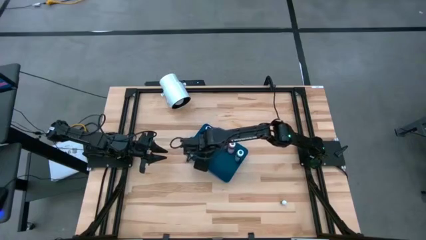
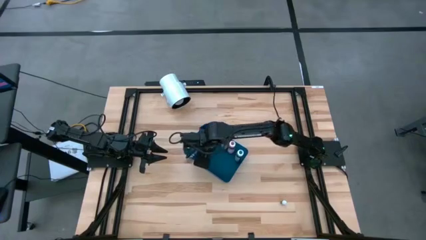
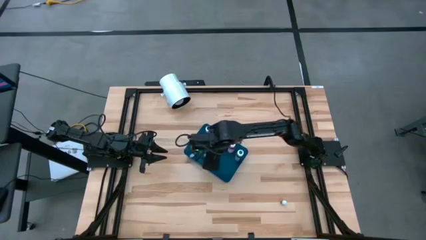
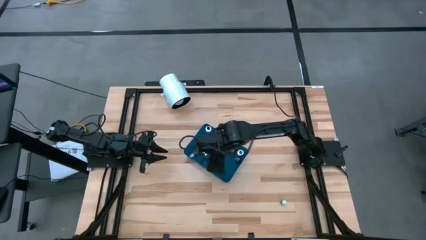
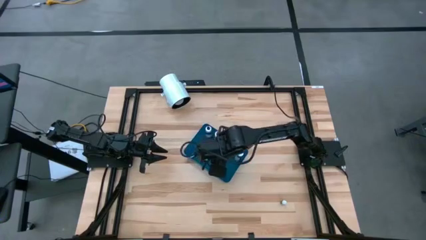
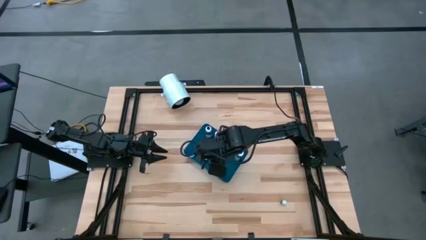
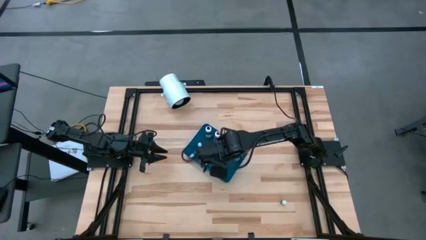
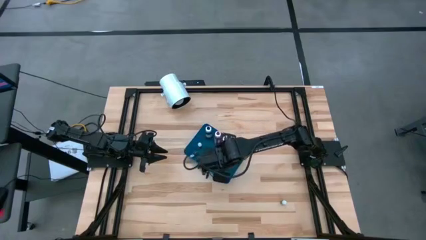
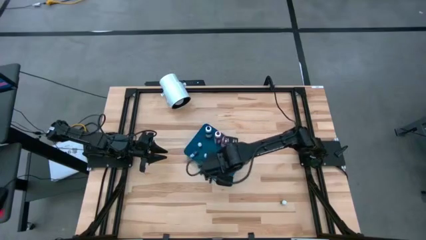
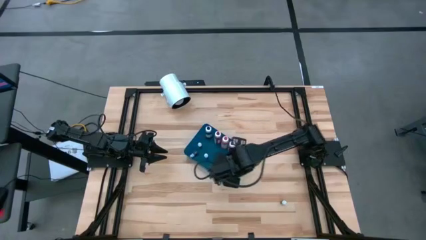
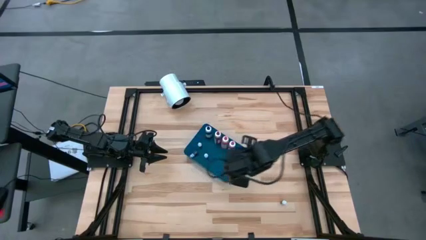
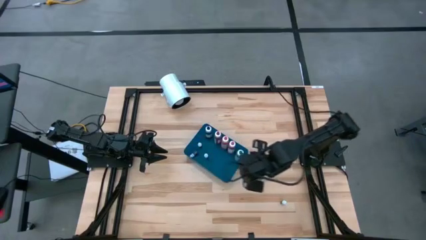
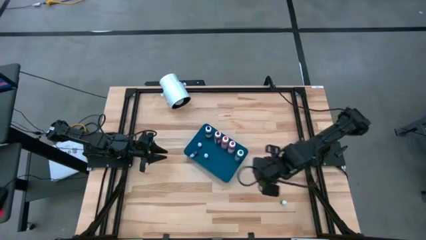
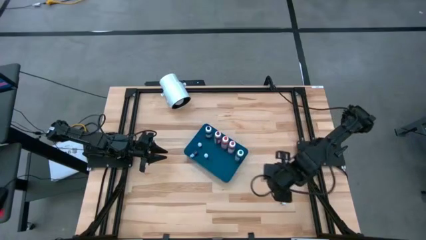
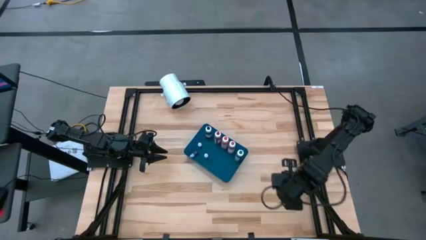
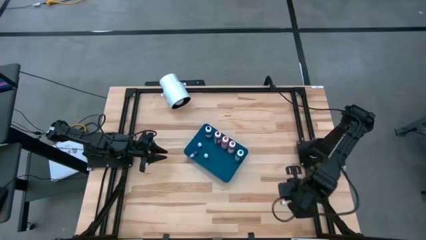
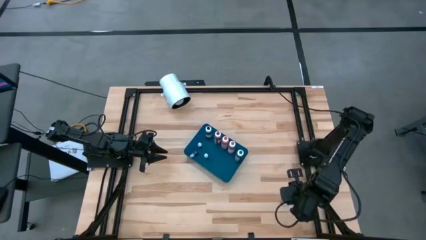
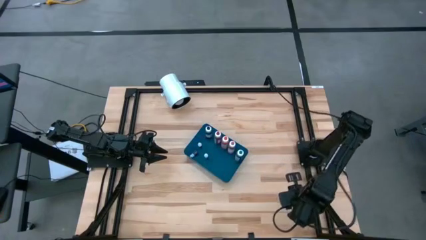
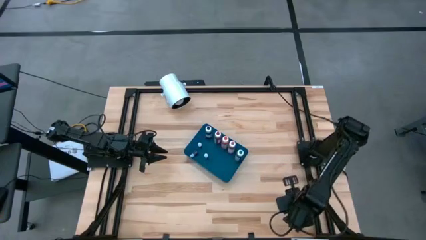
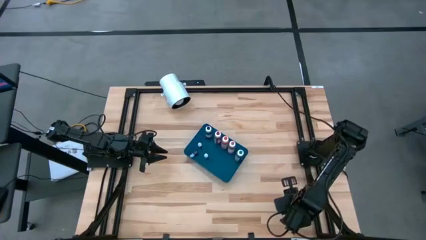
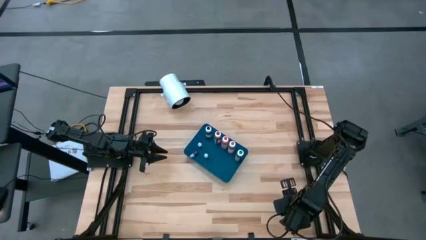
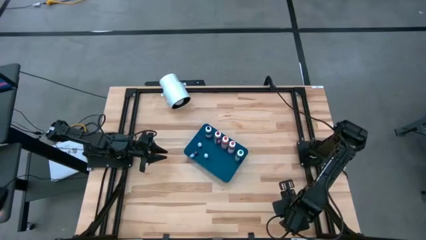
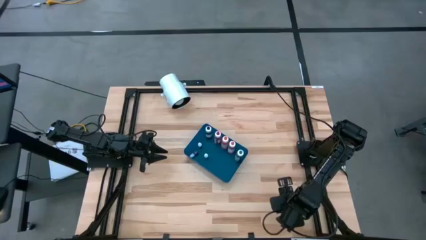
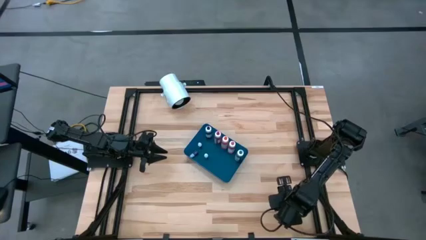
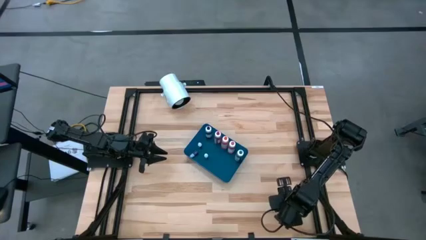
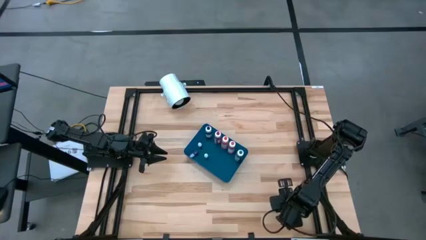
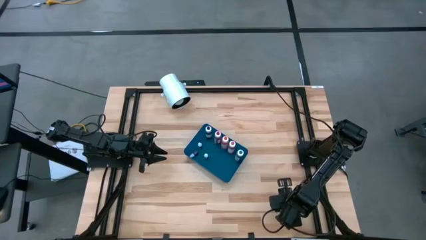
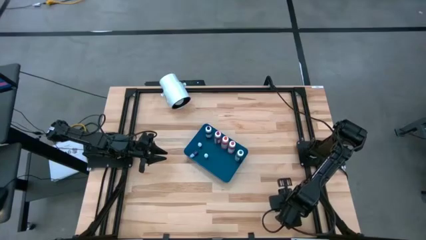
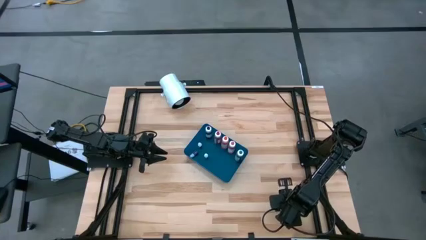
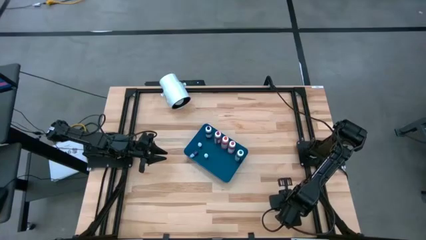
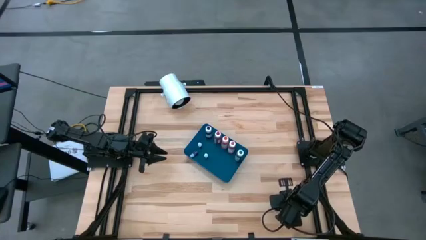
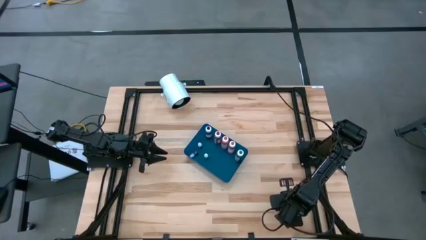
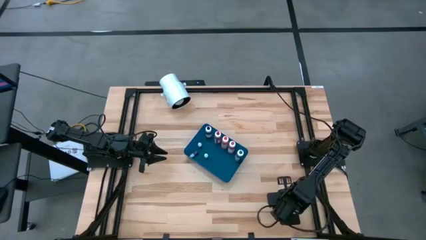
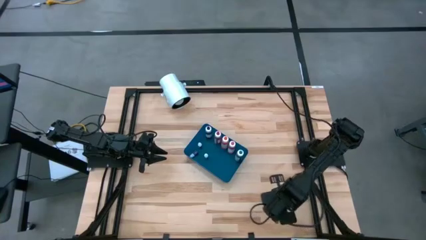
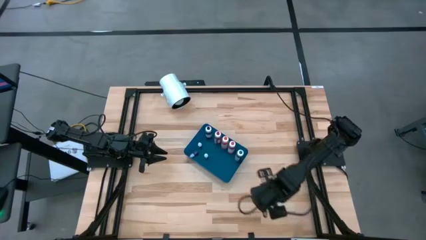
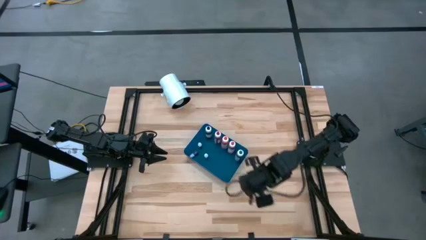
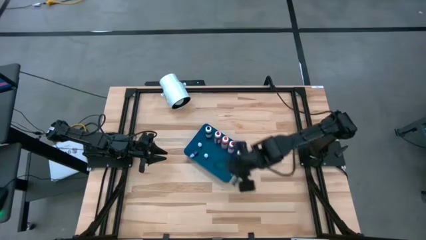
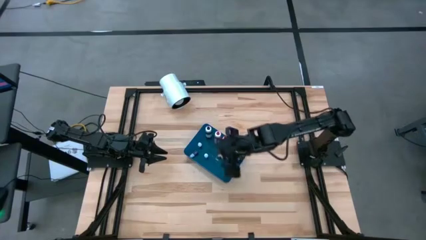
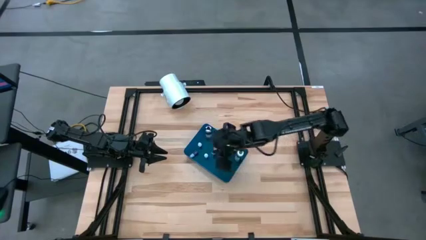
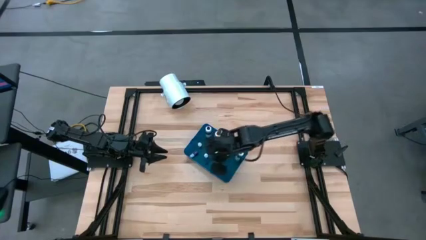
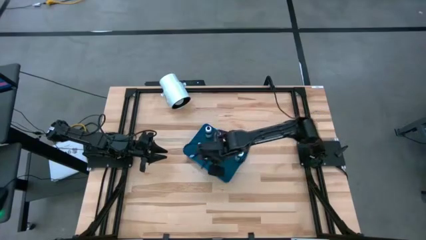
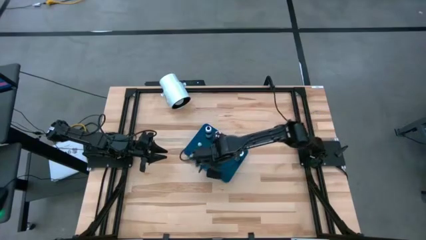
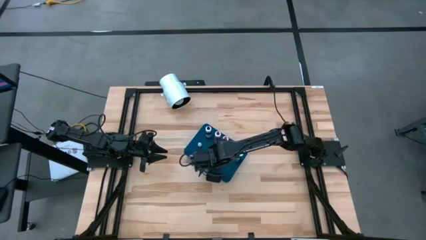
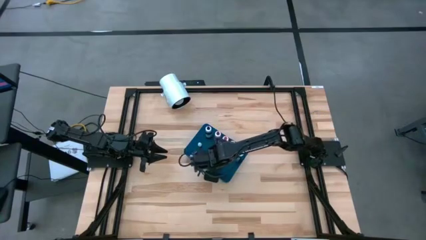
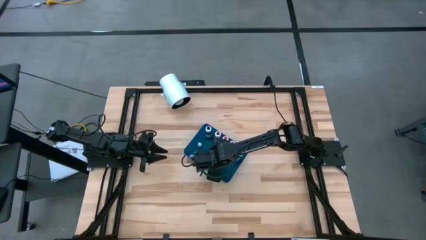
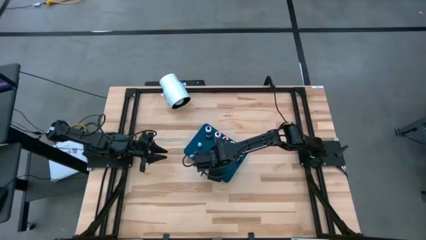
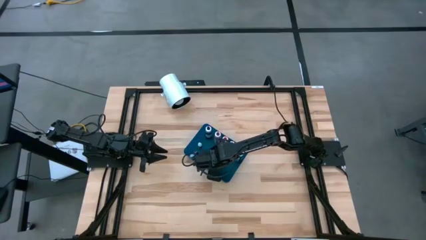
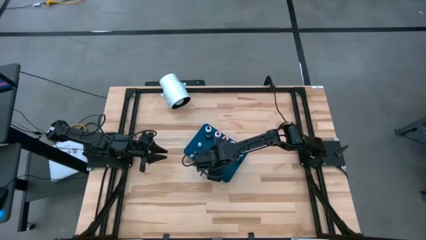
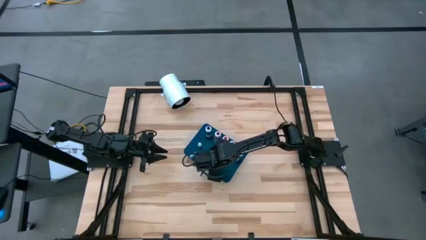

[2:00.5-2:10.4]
Task: Pick & Place food coloring
Put the small green food coloring bottle into the blue bin

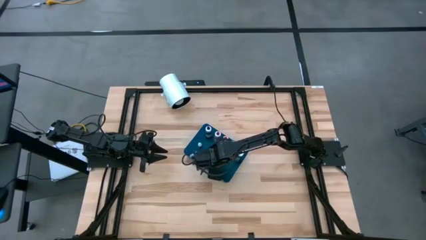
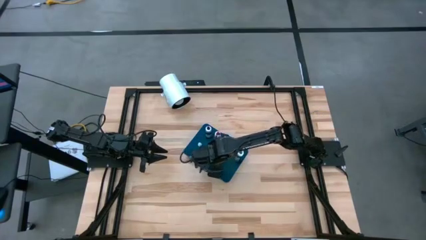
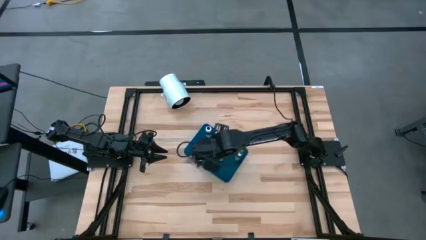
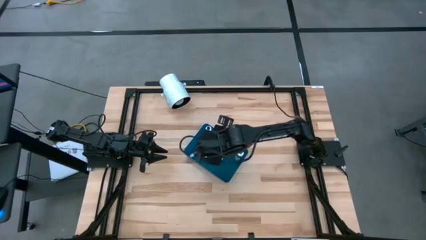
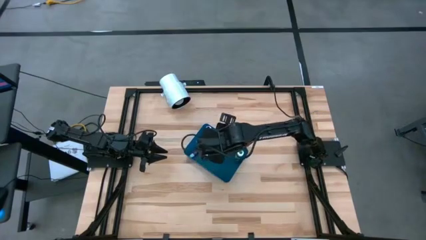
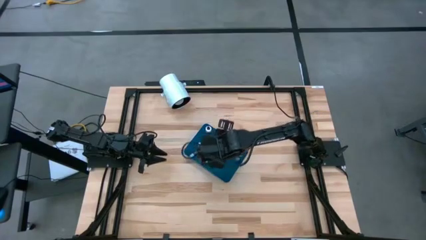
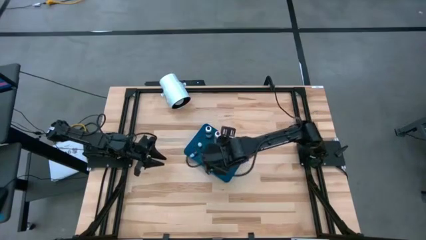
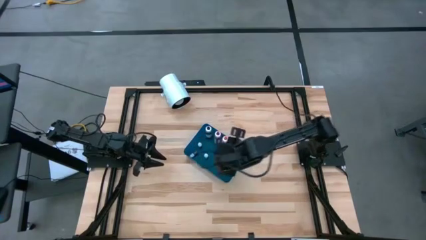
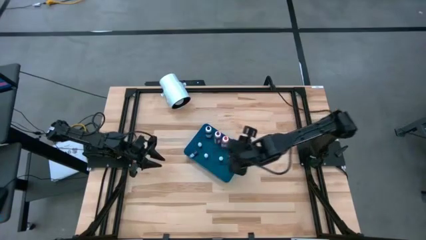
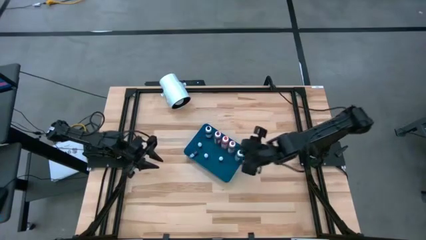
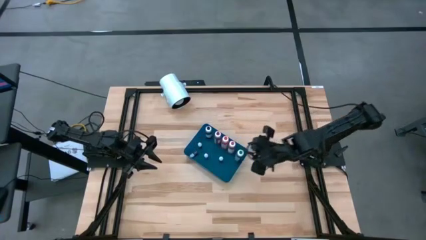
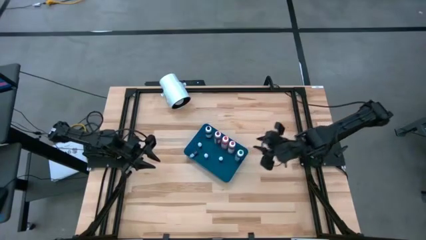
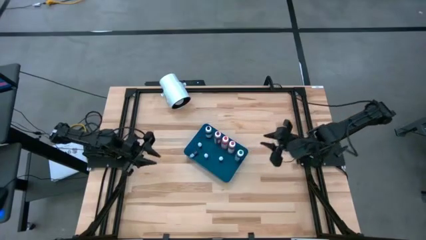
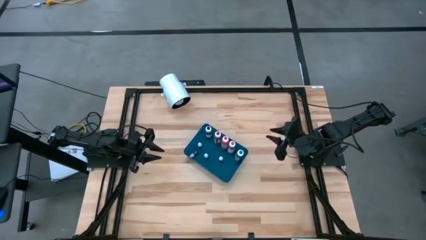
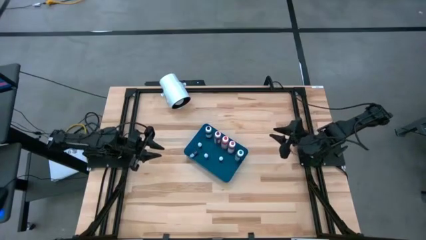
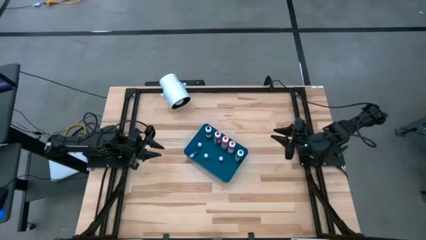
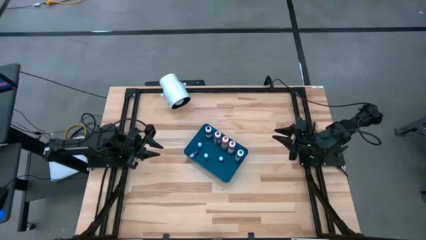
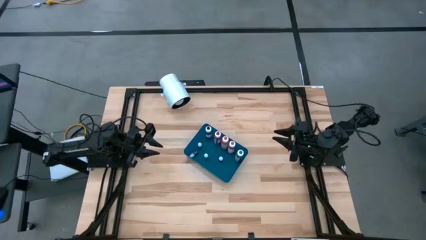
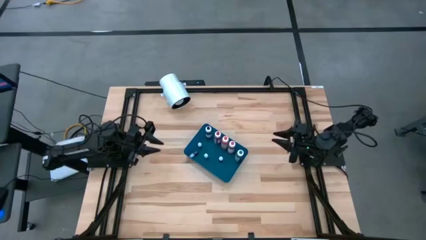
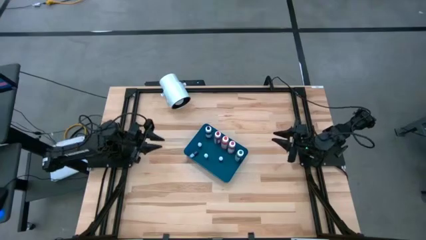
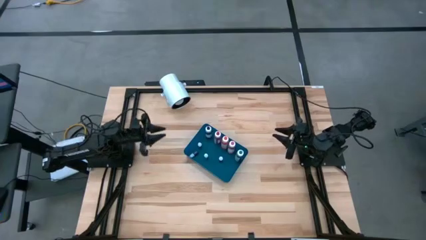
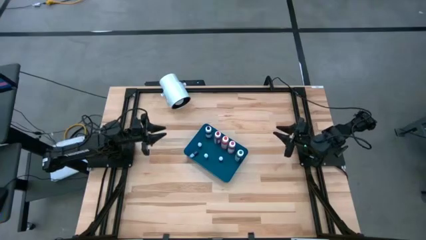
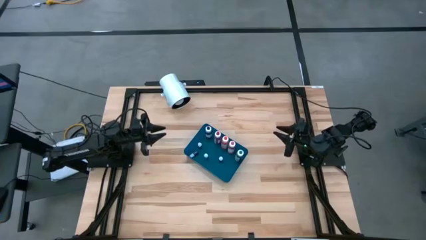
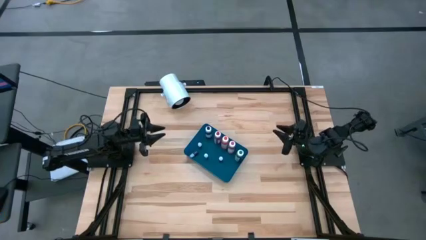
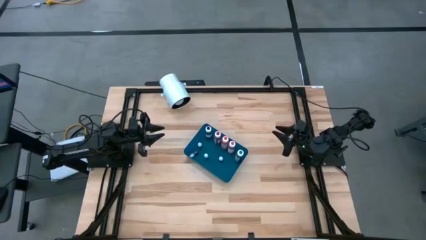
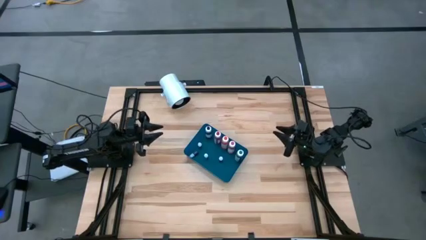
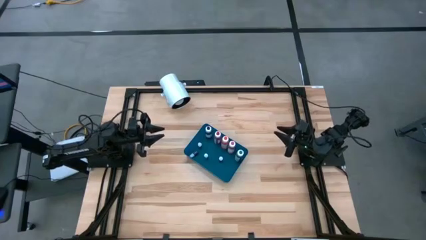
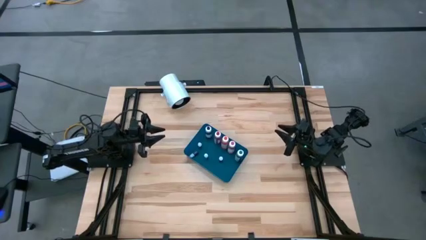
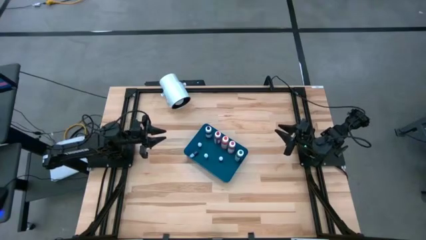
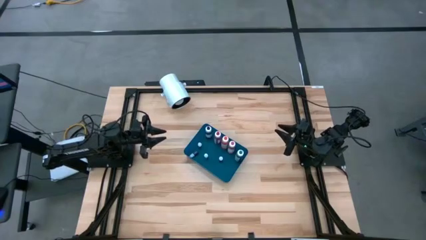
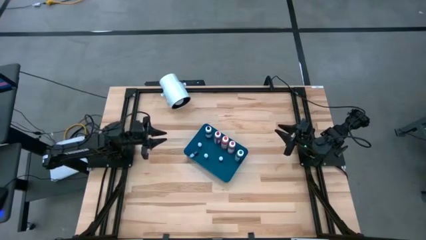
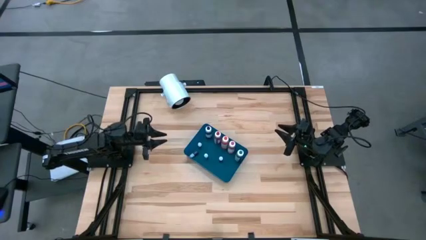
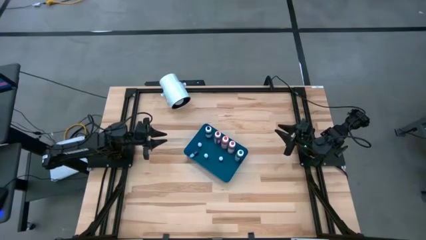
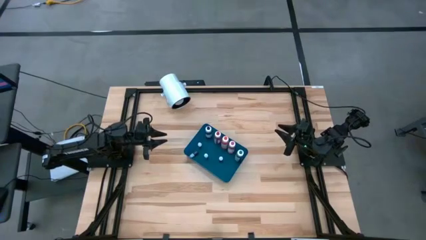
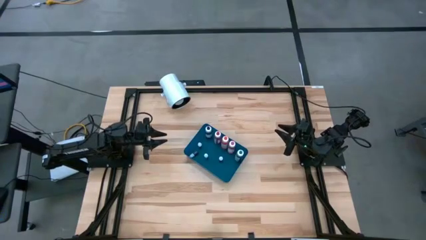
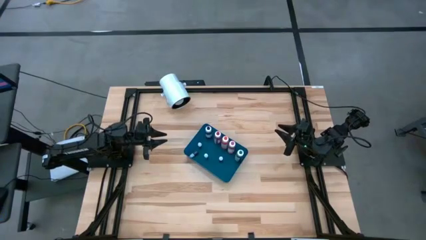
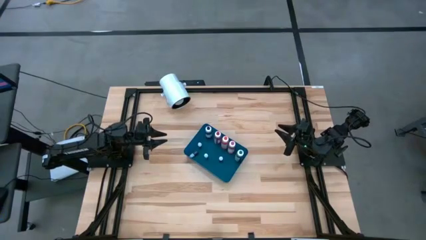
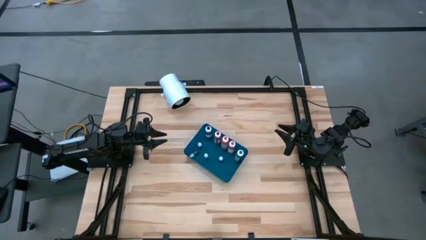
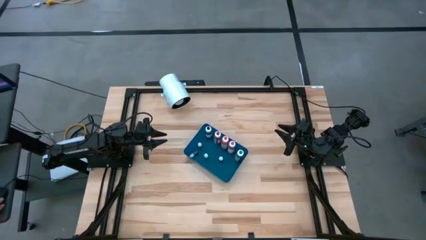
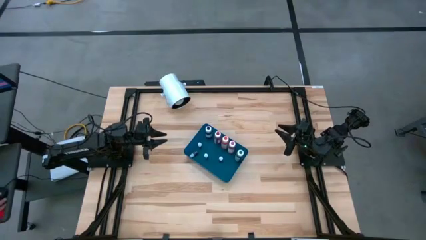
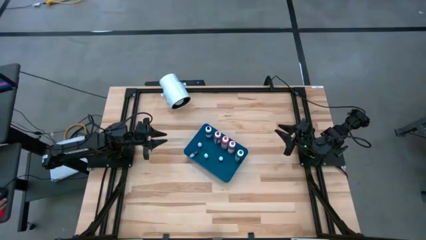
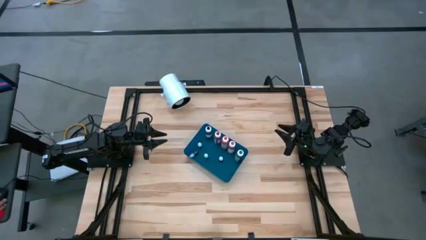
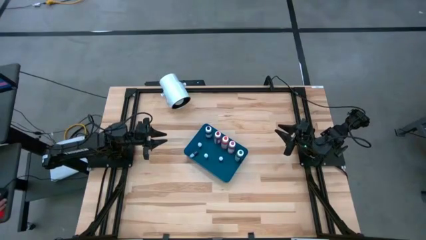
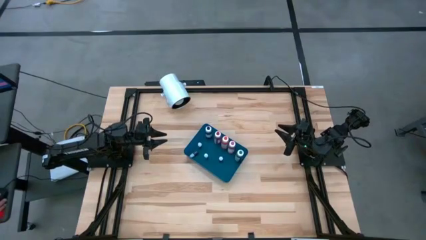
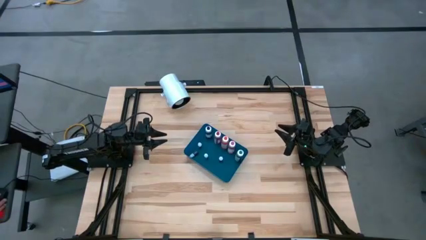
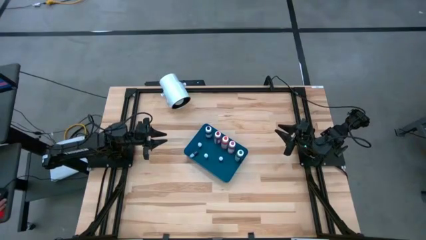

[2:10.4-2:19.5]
Return to Home Position
